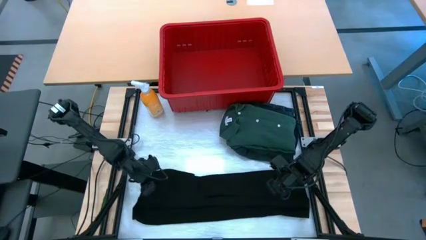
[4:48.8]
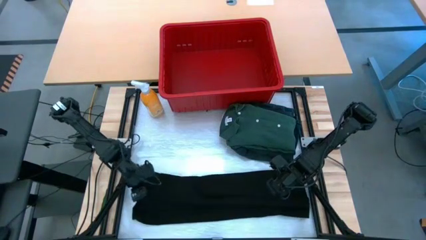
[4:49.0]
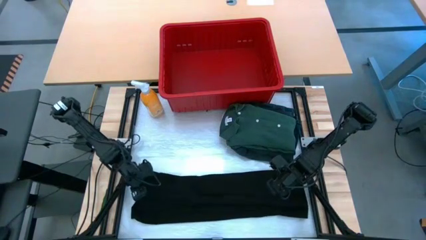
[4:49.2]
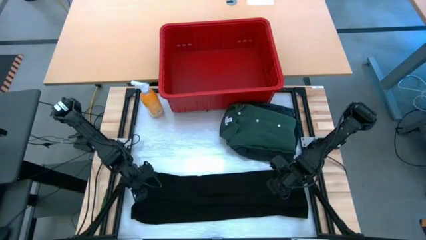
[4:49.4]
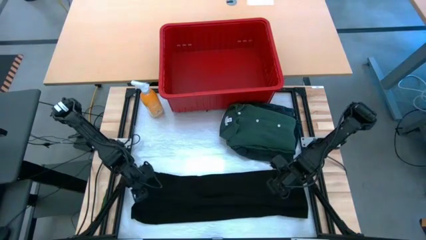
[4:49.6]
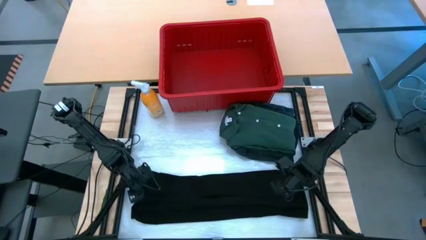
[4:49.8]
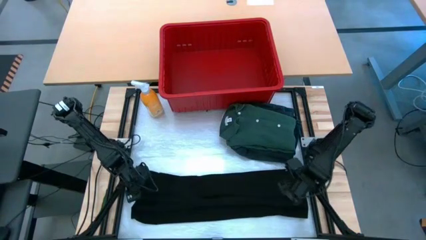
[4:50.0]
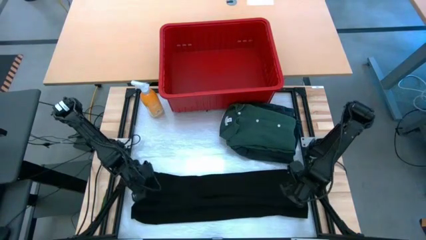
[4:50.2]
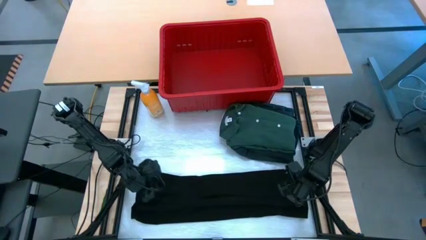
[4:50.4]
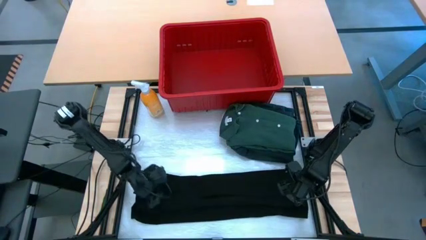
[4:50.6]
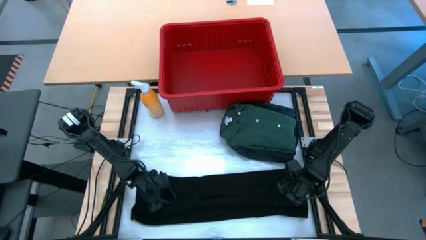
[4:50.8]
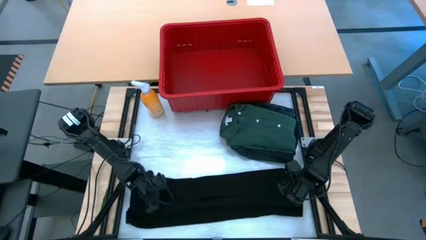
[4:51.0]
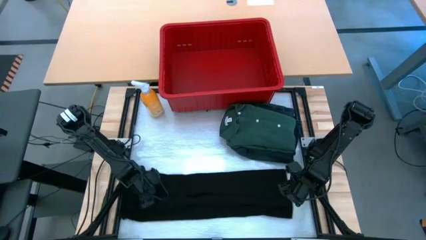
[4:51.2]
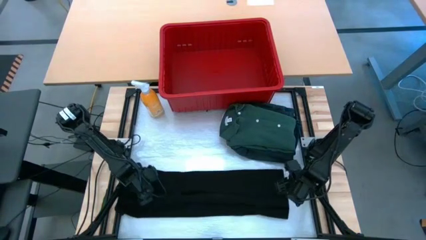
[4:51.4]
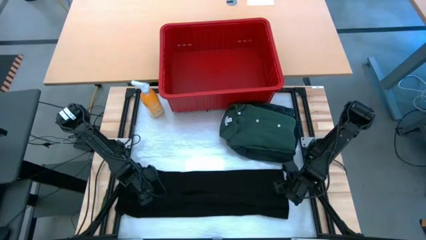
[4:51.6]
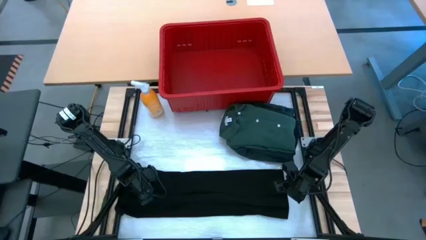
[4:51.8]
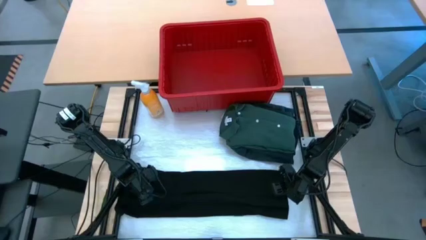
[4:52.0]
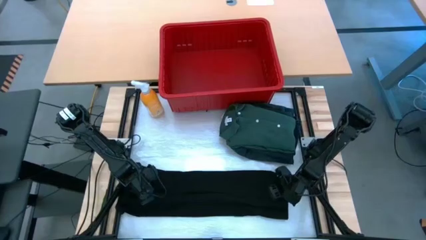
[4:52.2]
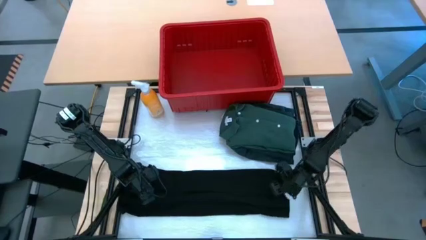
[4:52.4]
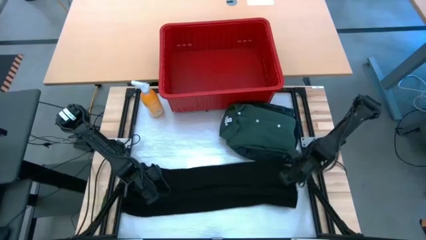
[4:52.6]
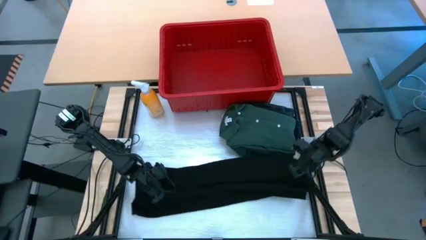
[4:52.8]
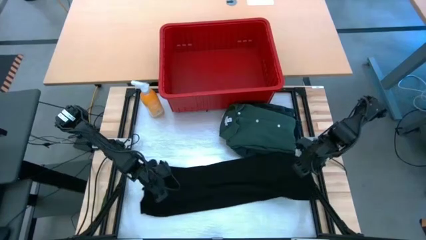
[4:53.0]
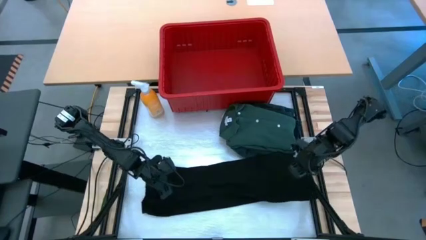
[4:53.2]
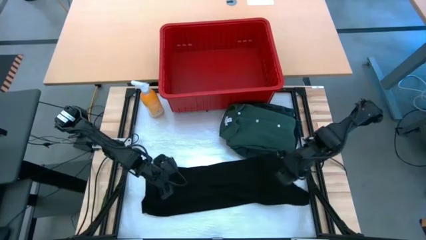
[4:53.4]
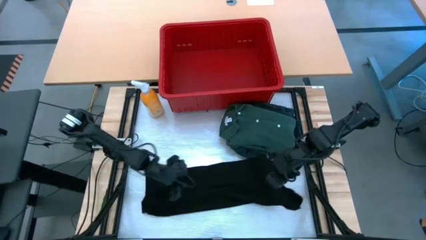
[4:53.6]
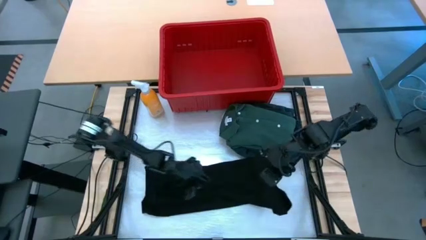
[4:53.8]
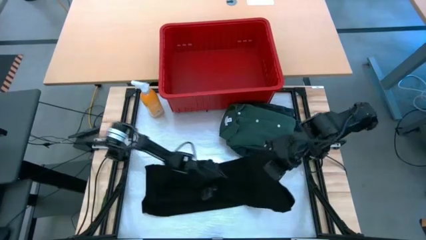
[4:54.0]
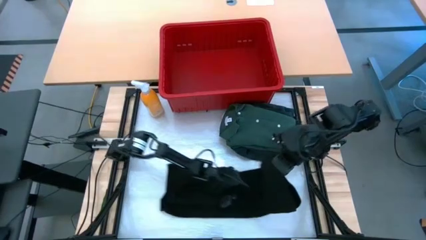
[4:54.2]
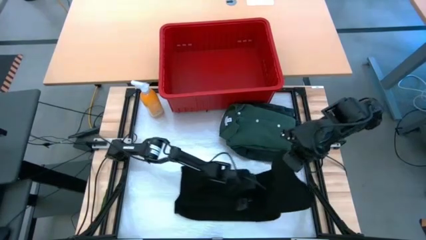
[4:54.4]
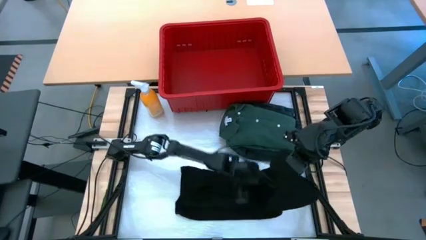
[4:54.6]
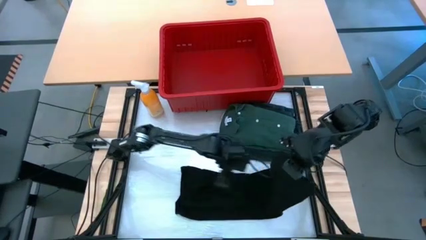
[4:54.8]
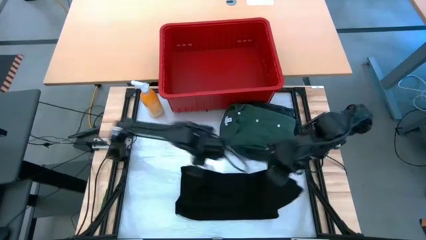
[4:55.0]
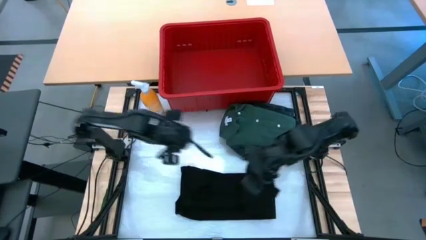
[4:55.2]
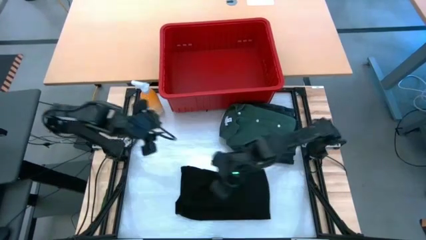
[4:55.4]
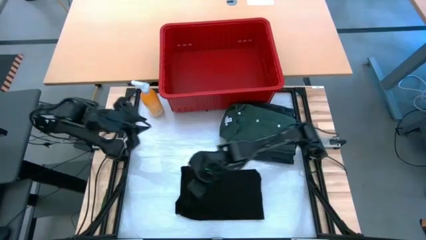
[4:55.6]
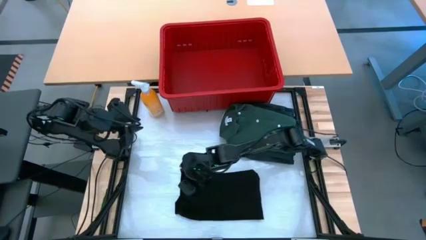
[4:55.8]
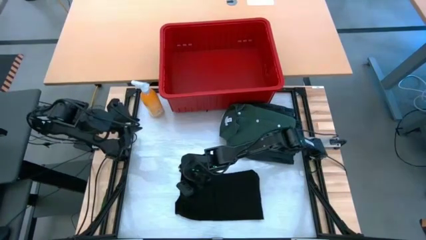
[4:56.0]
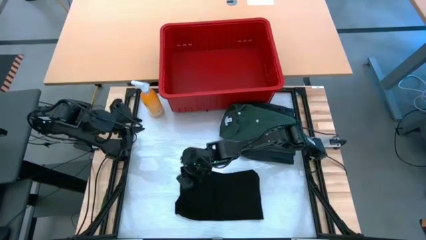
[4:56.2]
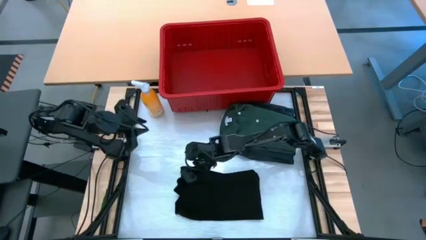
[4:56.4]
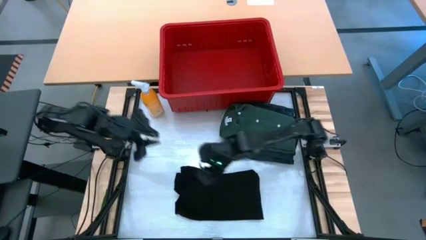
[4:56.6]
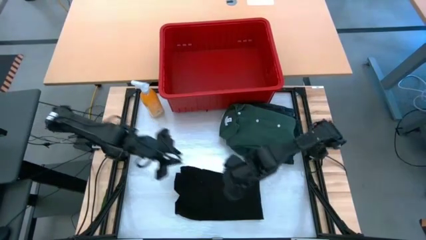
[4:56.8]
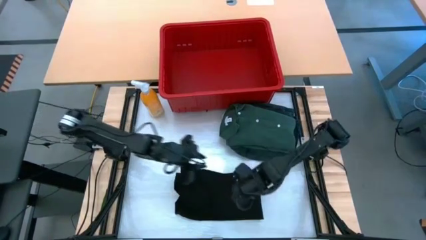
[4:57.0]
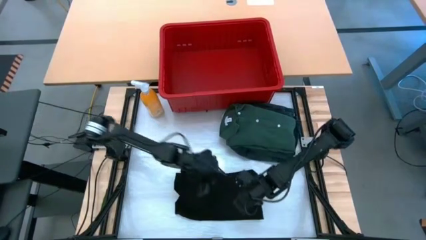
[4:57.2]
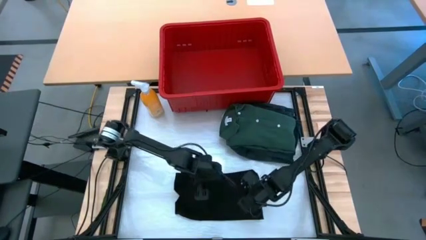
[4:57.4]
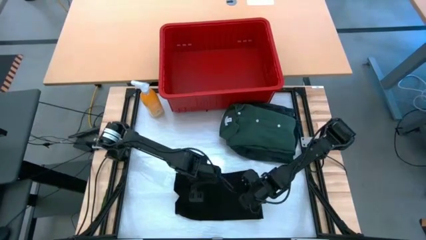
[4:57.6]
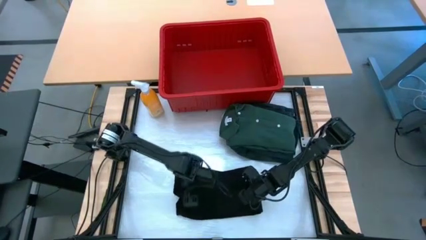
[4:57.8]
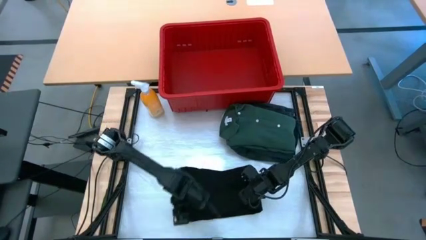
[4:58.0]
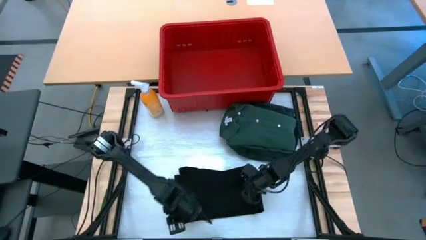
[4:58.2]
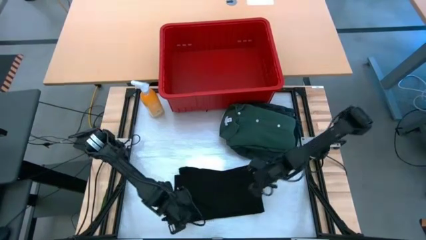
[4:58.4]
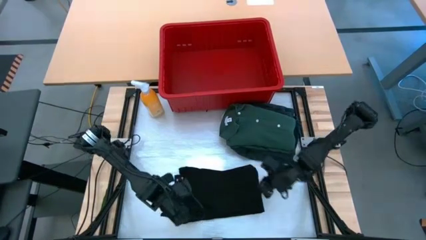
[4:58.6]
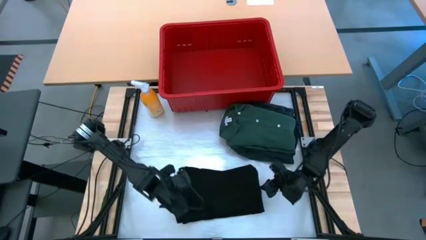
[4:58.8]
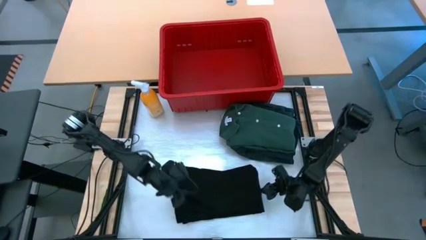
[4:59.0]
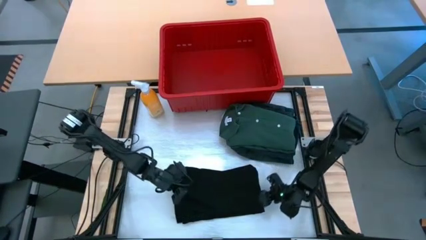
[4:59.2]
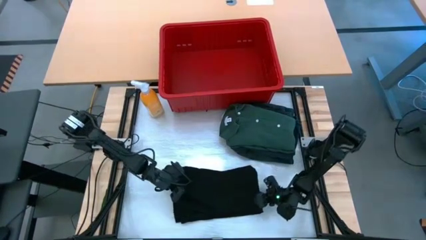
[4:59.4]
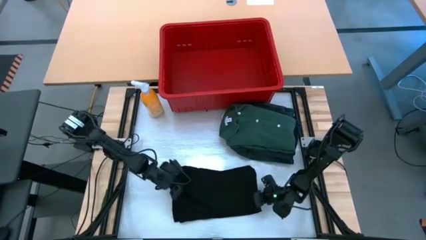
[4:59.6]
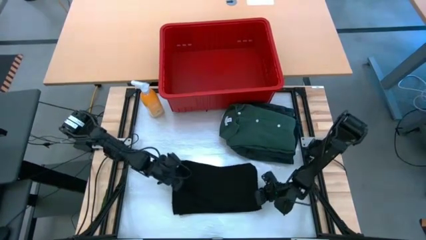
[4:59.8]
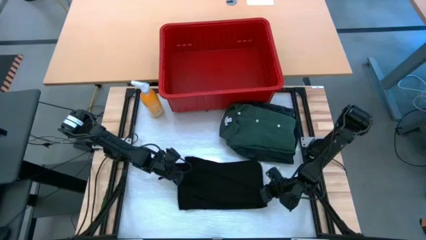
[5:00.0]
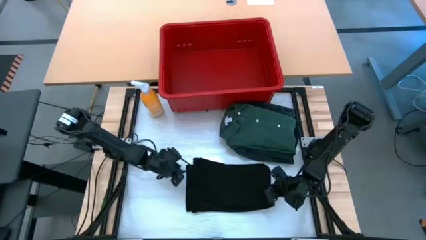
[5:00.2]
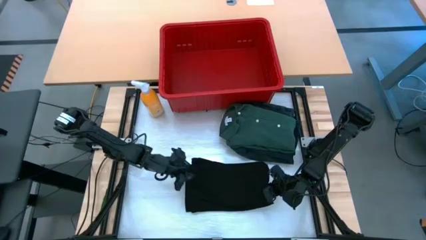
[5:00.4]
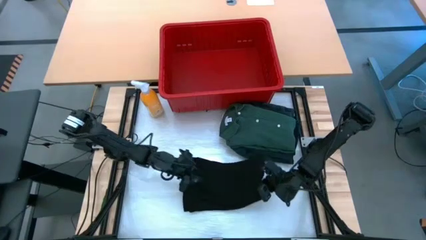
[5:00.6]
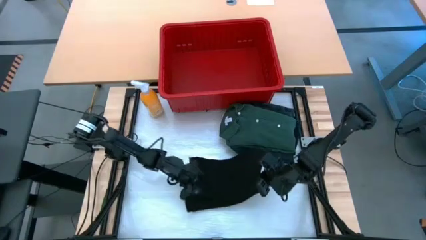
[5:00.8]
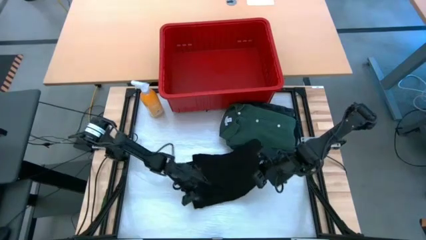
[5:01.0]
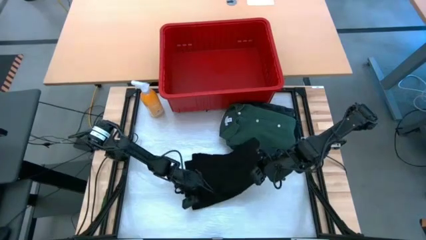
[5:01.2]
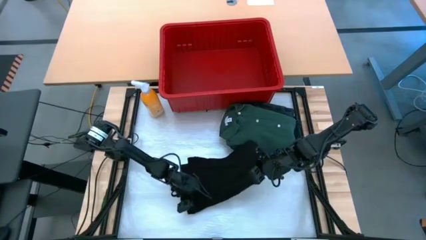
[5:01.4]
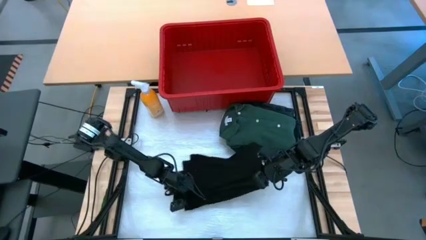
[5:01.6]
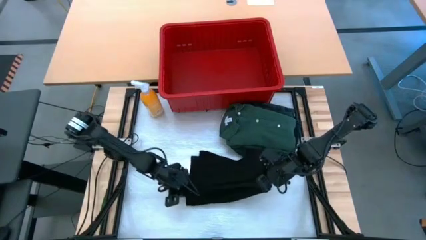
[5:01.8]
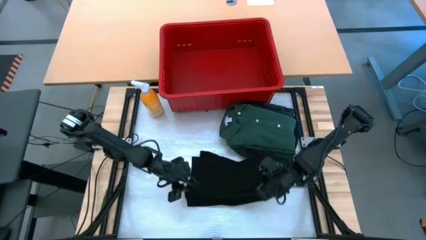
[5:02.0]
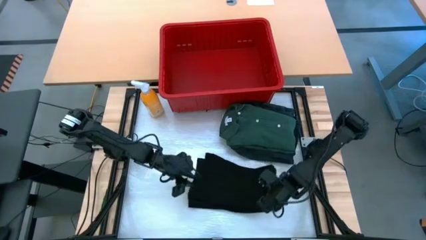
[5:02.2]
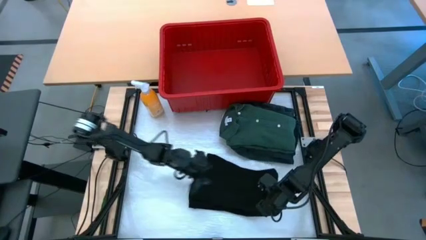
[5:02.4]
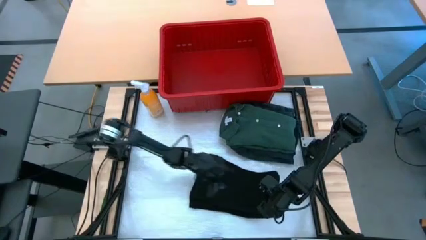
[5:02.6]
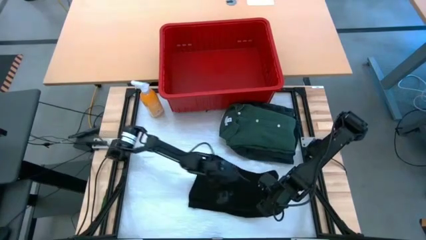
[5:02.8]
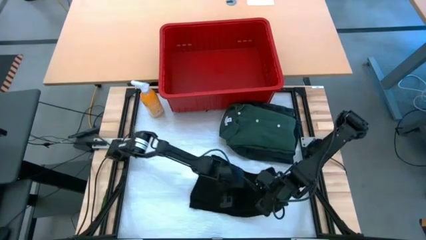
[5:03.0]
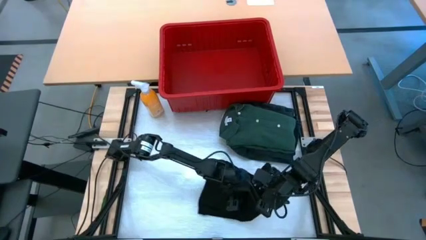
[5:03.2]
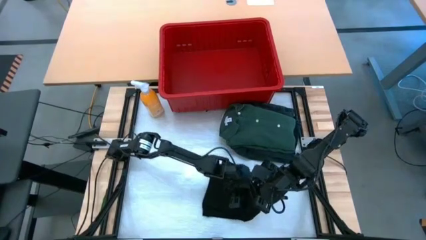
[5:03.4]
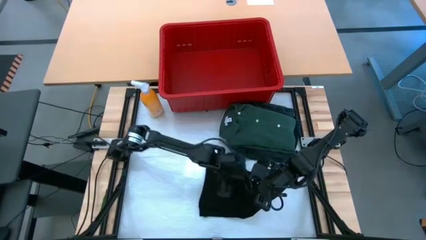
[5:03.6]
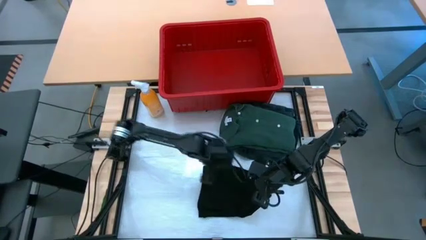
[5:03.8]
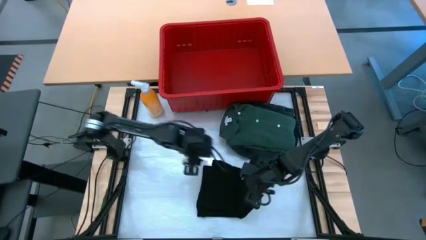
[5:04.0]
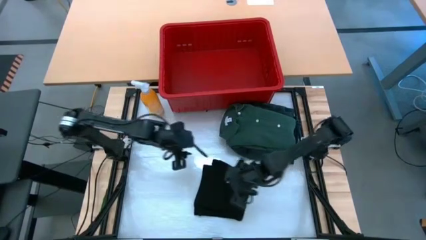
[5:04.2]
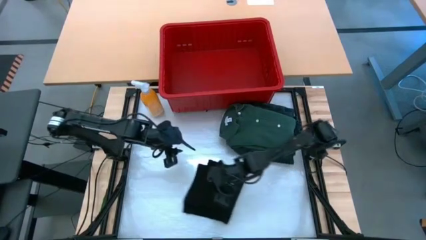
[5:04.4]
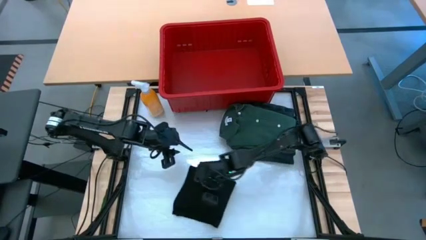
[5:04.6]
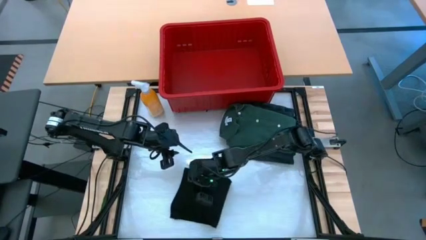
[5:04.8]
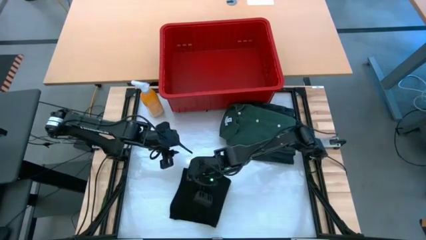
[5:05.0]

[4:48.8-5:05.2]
Task: Fold laundry
Fold the black shirt
